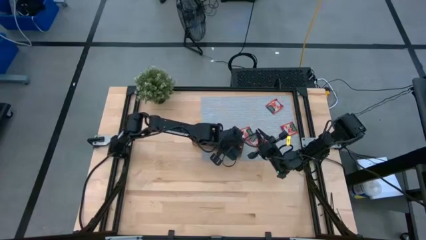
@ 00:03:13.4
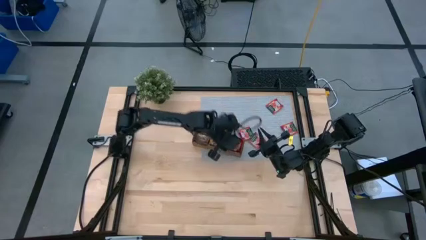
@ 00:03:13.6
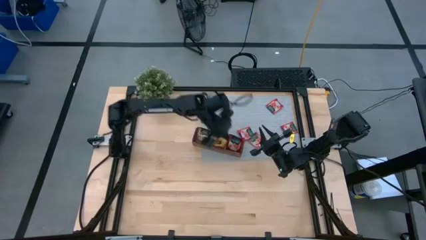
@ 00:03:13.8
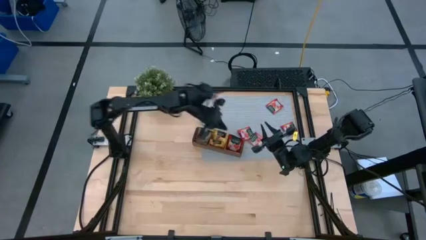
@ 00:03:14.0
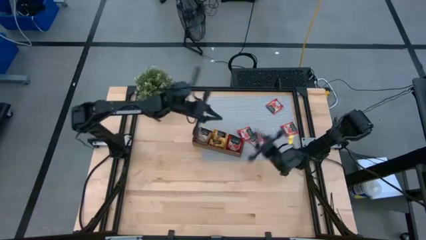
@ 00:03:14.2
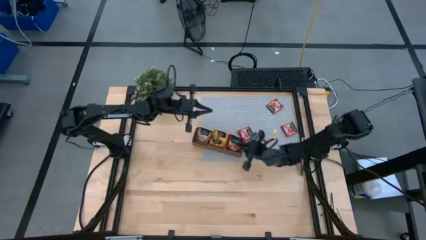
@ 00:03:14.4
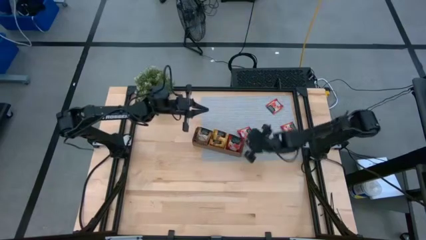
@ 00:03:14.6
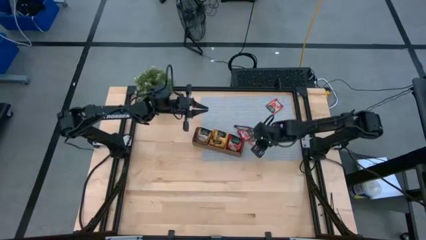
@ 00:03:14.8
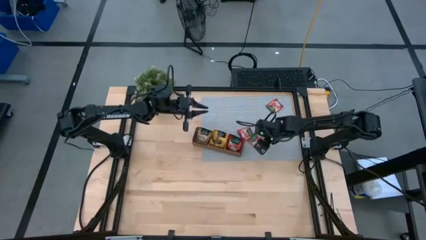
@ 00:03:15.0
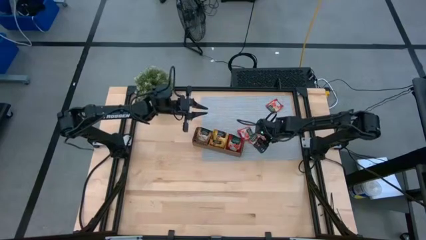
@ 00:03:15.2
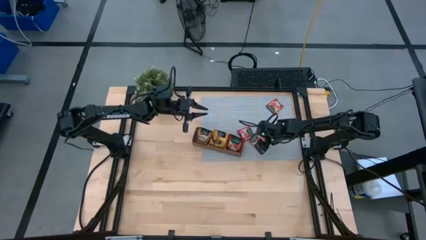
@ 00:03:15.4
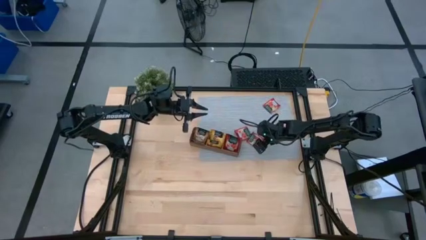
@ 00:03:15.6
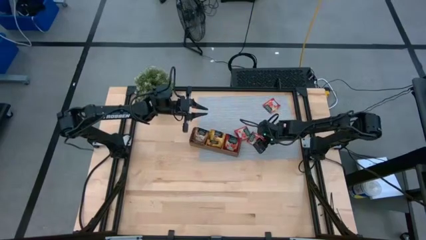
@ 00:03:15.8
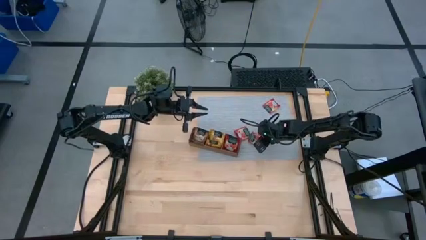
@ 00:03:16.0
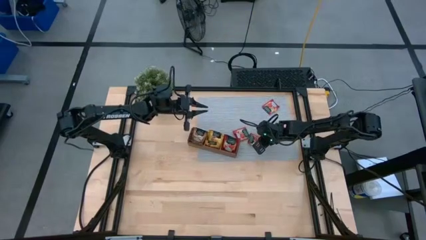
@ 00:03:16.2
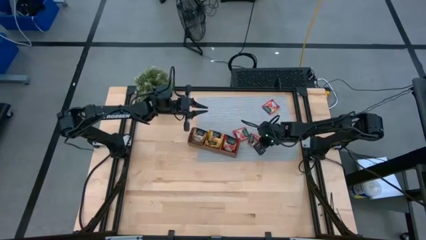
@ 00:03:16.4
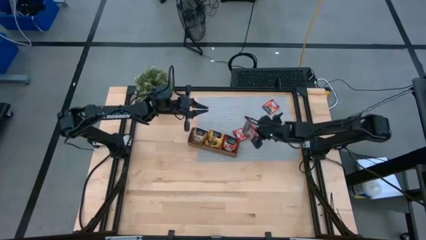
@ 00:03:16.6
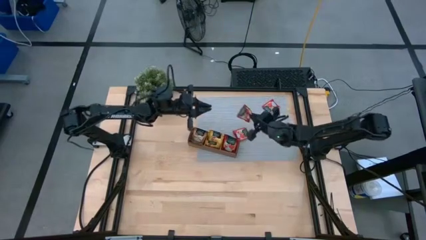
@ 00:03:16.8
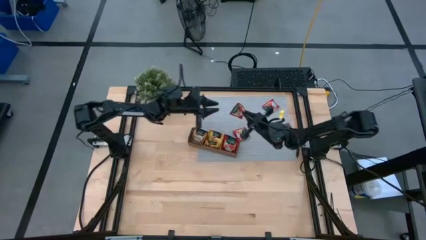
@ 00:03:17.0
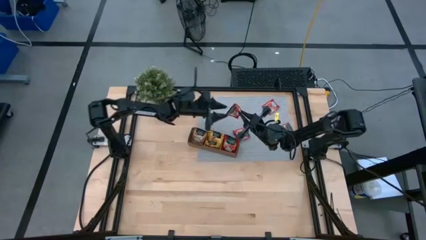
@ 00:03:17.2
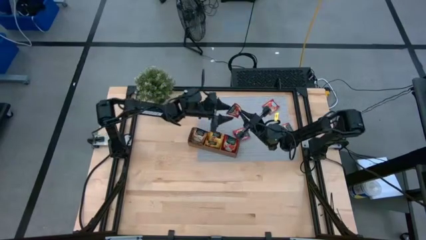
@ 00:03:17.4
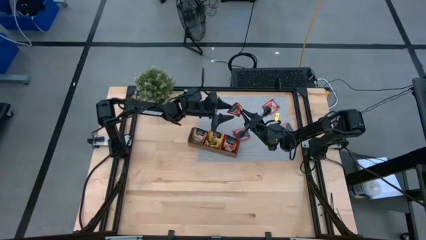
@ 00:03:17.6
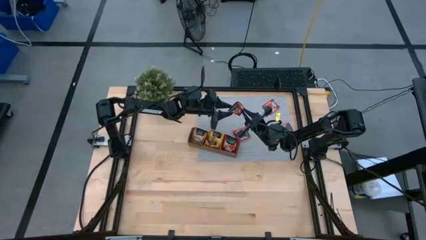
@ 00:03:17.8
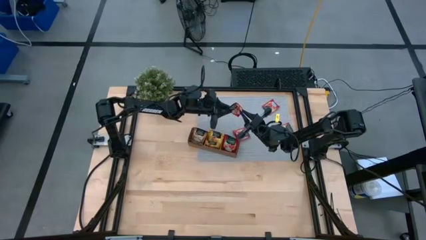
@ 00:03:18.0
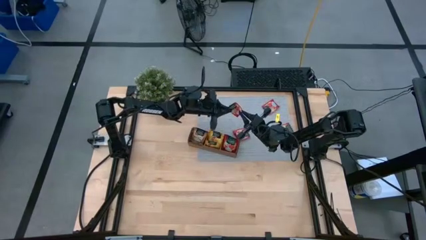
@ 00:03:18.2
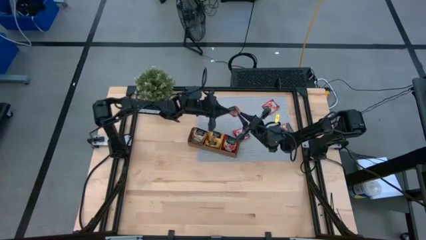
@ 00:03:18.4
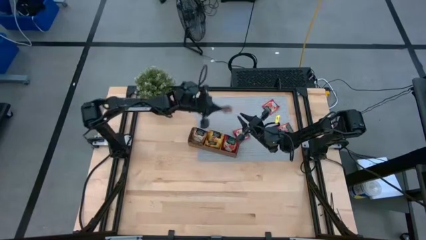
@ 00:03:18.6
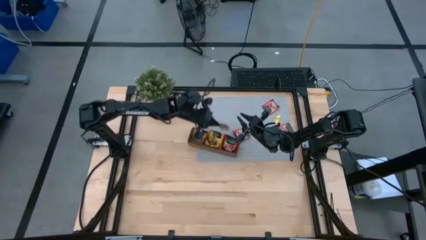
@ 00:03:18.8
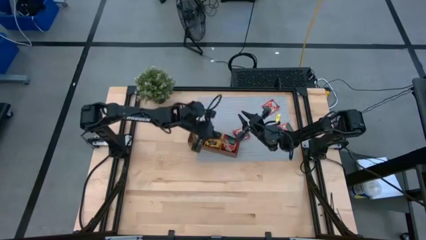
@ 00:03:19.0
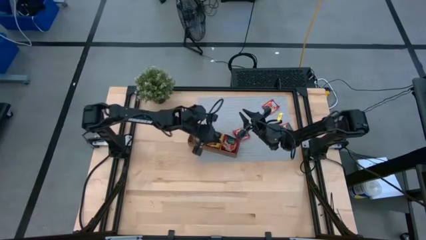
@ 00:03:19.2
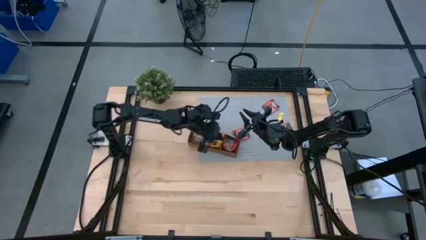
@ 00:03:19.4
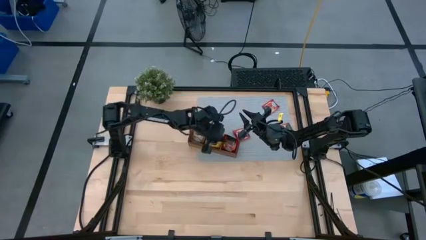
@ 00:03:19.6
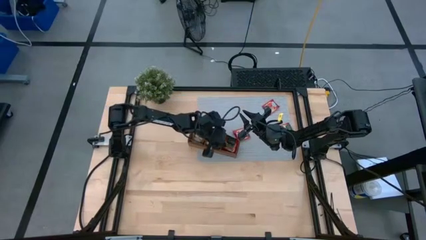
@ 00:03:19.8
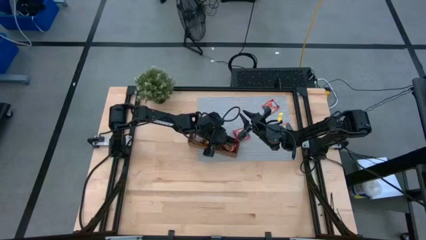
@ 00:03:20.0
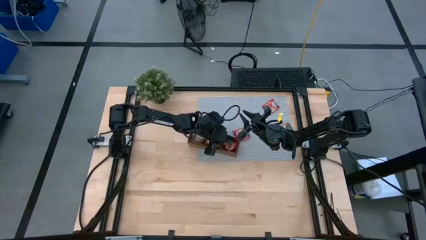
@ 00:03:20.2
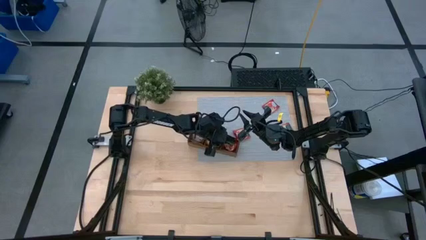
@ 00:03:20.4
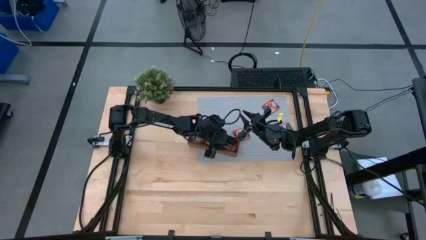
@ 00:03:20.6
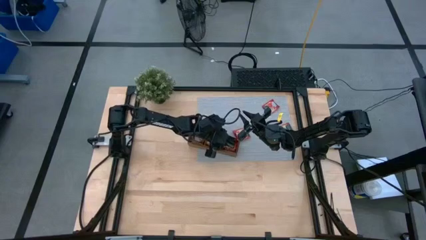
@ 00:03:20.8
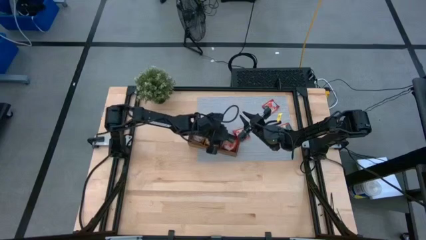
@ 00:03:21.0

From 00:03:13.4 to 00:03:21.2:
Task: Pick & Place Tea
Put the red tea bag into the right section of the wooden organizer

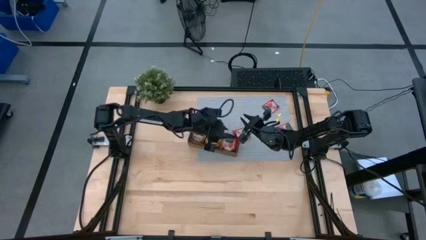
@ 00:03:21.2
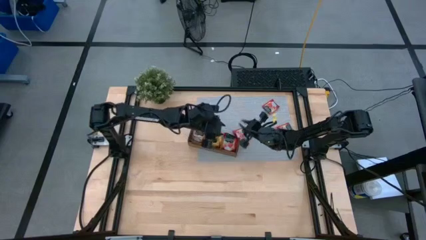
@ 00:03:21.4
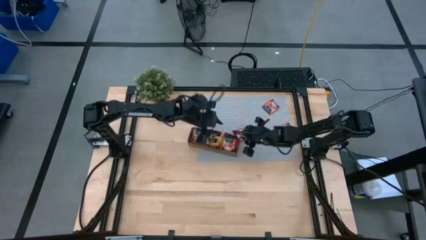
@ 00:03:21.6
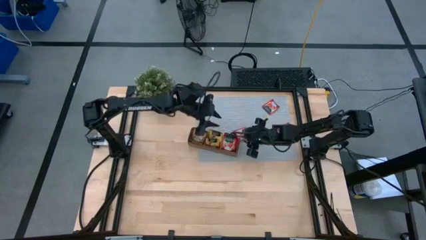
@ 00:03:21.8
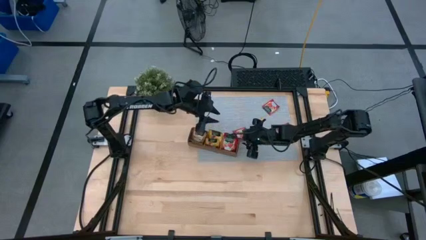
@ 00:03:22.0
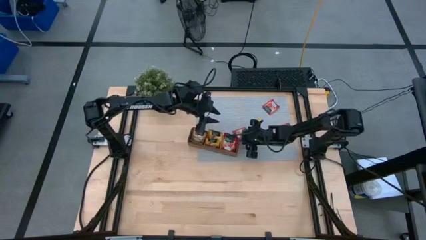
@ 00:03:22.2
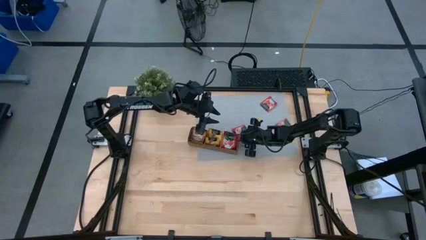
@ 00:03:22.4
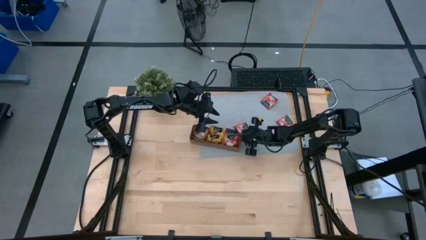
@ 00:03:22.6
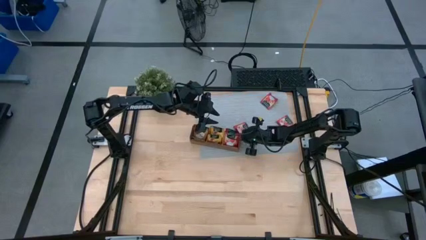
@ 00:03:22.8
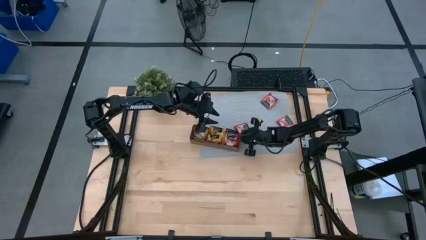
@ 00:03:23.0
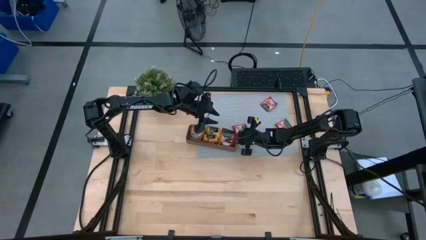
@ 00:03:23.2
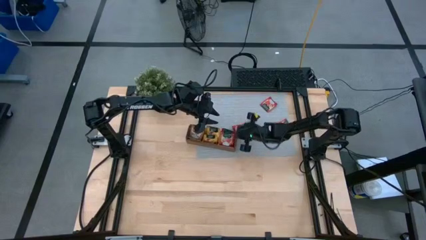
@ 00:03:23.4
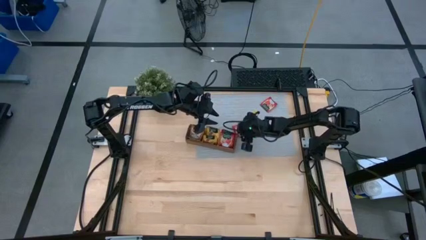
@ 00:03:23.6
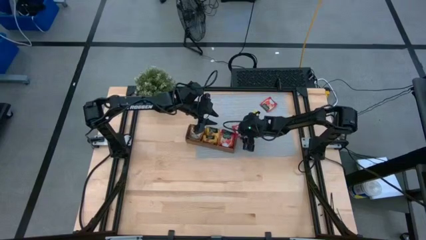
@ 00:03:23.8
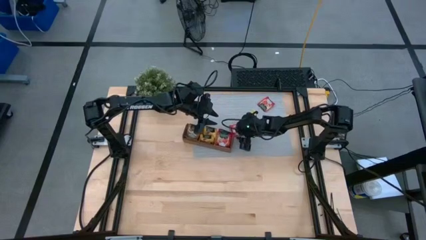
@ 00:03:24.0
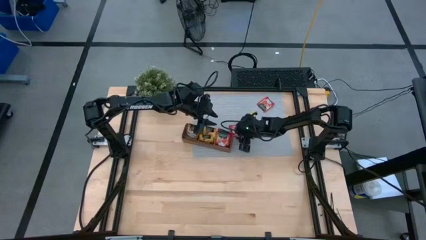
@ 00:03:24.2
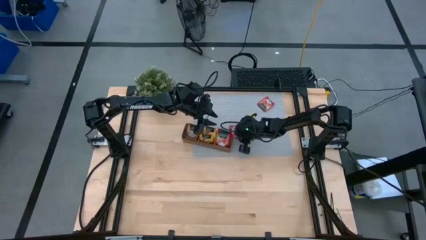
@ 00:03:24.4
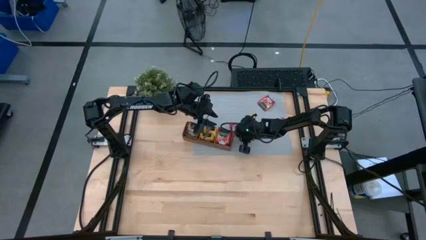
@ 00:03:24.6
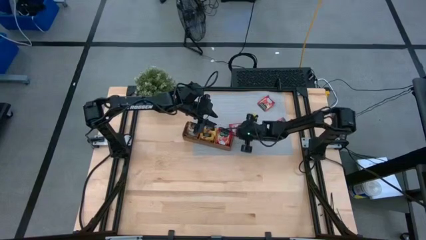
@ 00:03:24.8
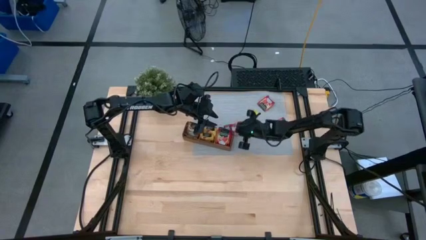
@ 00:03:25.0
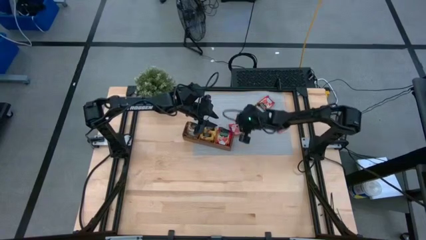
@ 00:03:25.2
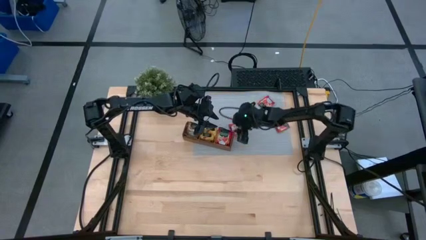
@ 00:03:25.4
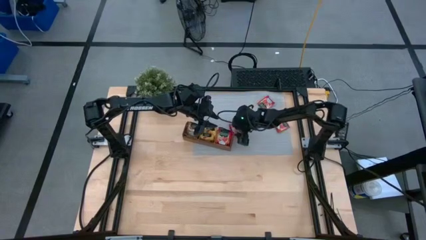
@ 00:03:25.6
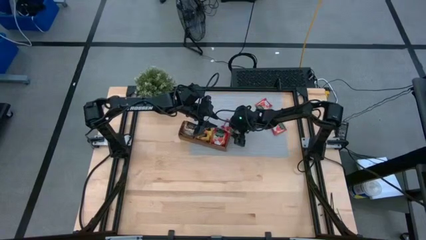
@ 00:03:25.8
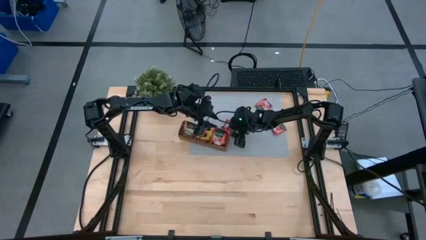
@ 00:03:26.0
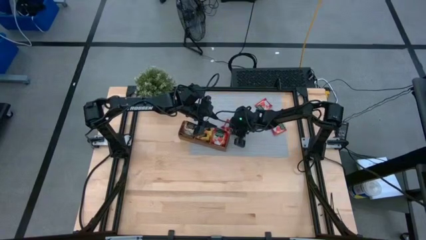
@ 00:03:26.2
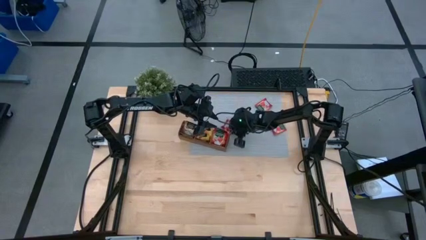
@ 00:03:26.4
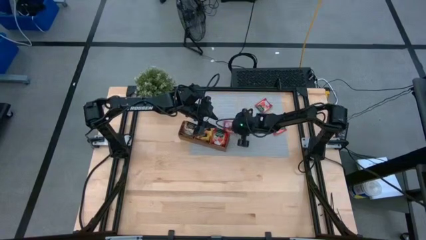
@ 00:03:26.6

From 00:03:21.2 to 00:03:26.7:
Put the red tea bag into the right section of the wooden organizer
